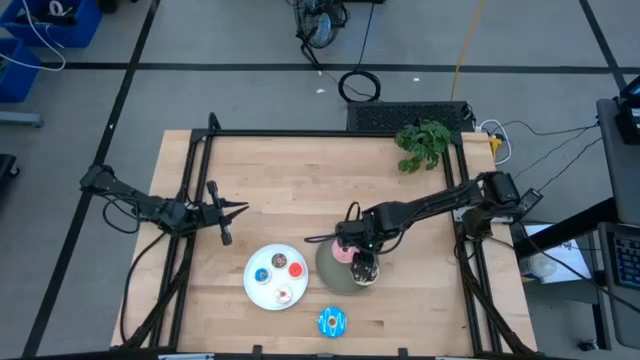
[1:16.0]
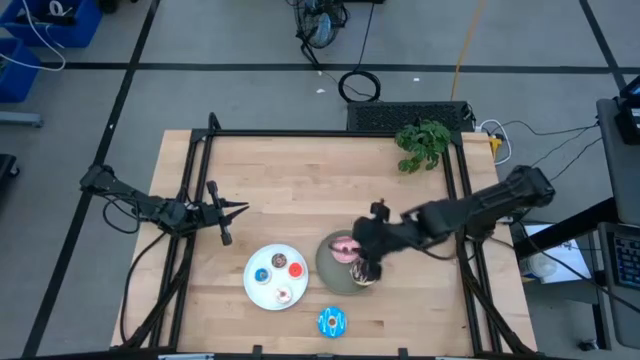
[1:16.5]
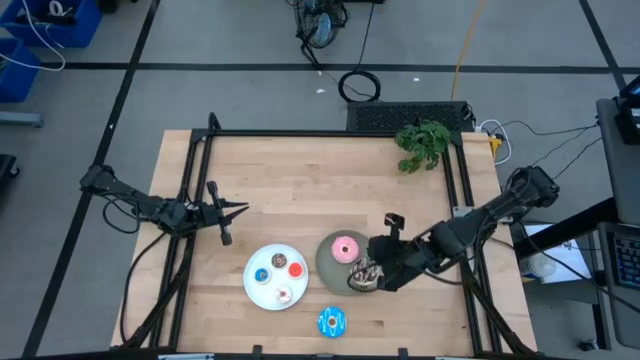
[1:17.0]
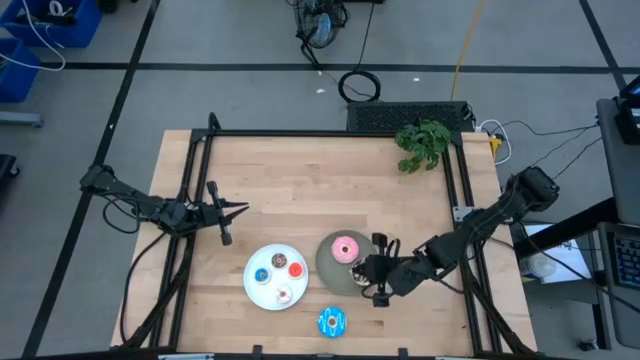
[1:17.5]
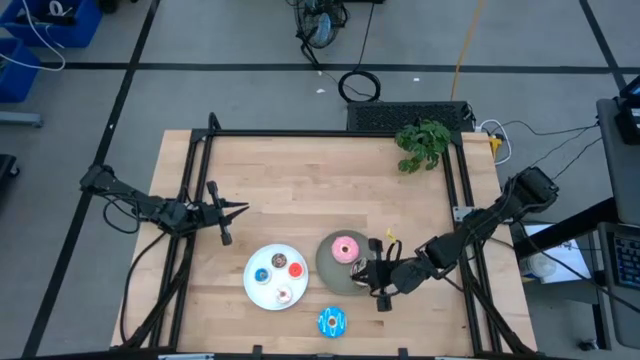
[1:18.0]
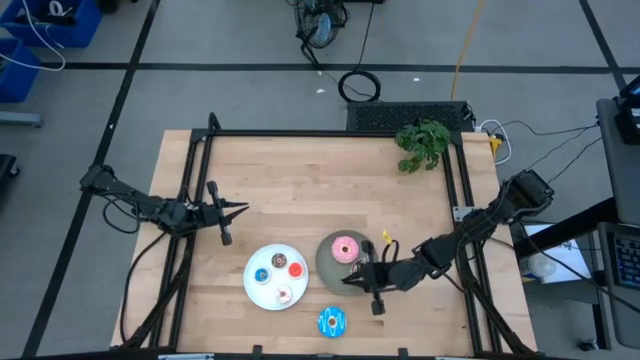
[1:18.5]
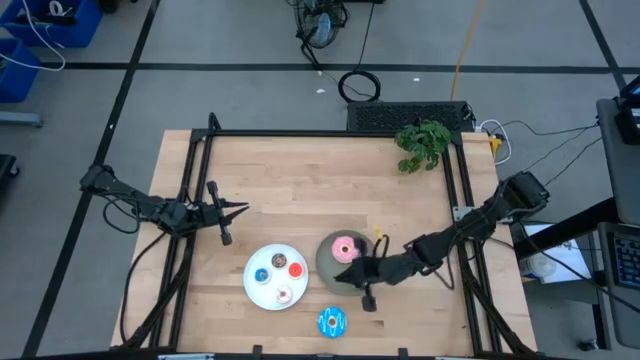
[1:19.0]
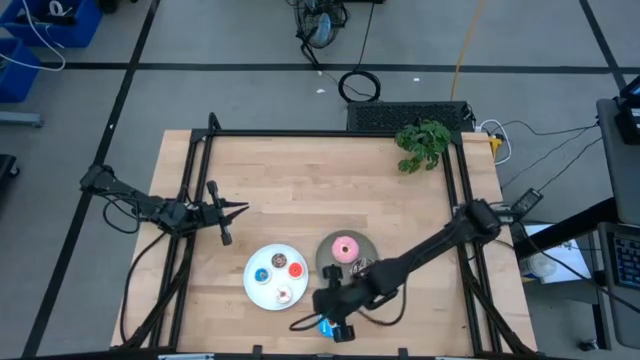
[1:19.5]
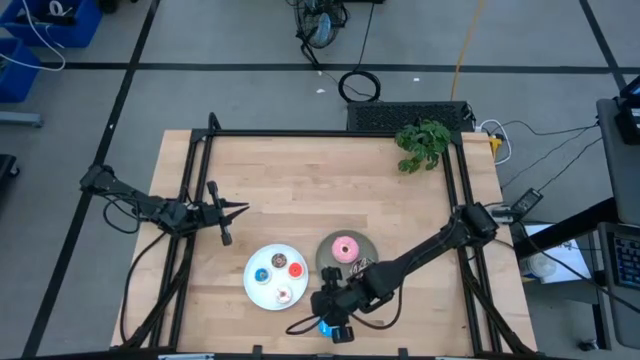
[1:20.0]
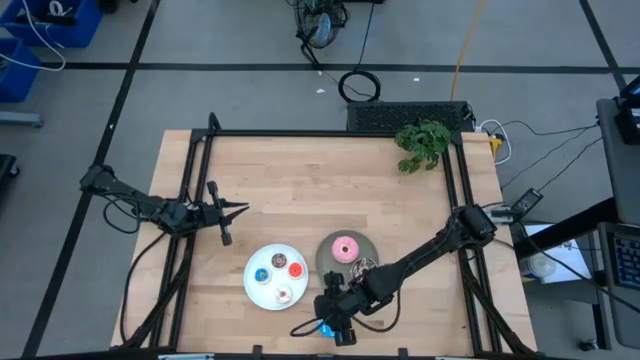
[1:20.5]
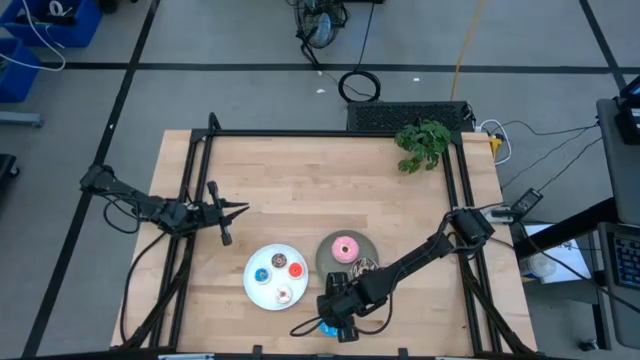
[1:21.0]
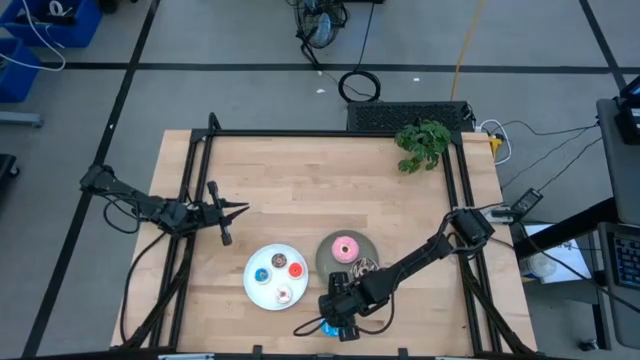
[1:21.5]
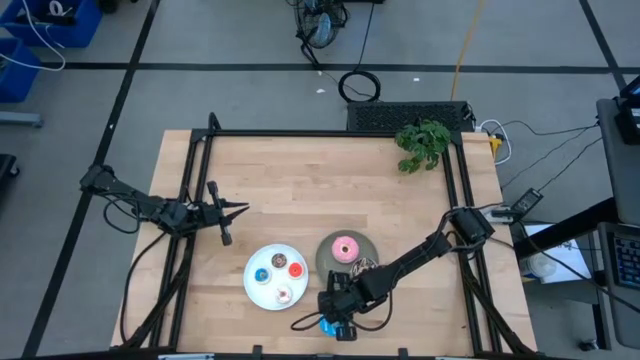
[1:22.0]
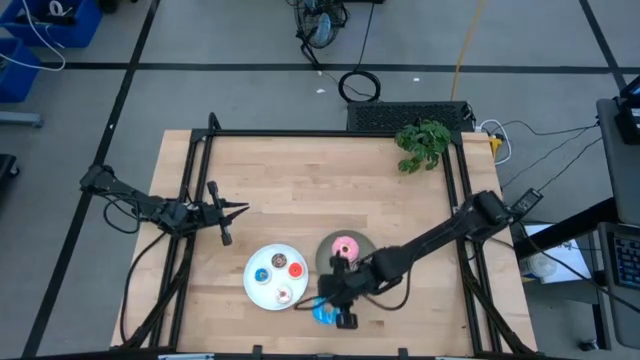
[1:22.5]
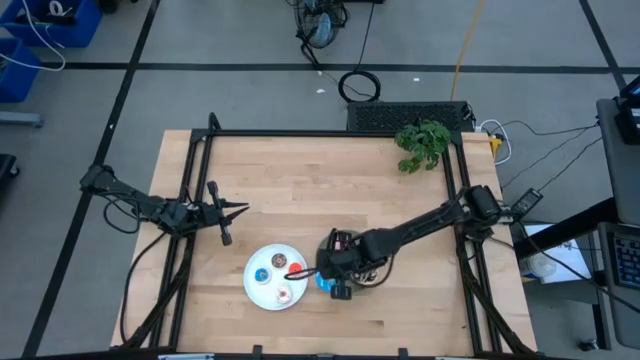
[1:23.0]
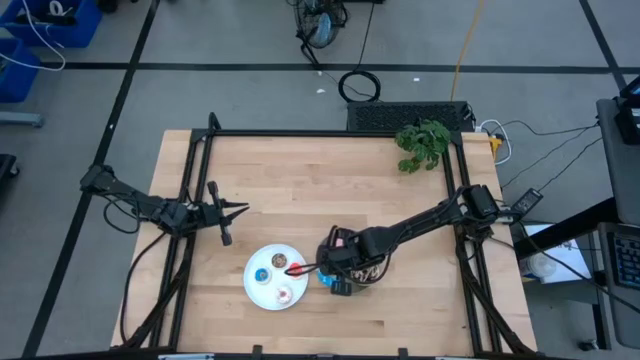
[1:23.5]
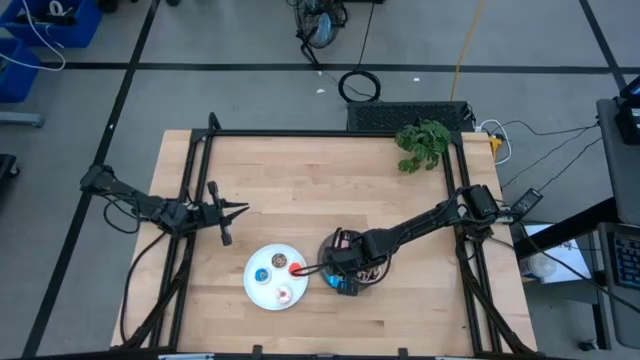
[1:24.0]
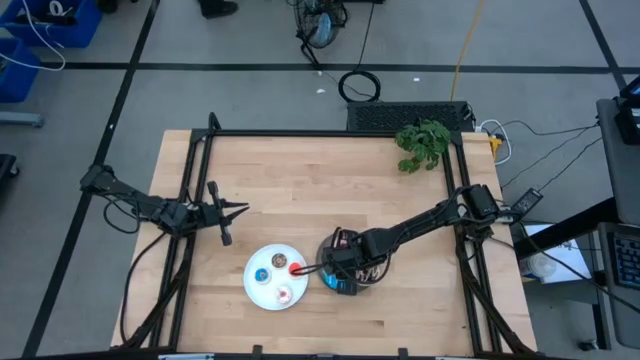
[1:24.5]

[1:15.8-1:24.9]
Task: Pick & Place donuts
Put the large blue donut on the gray plate

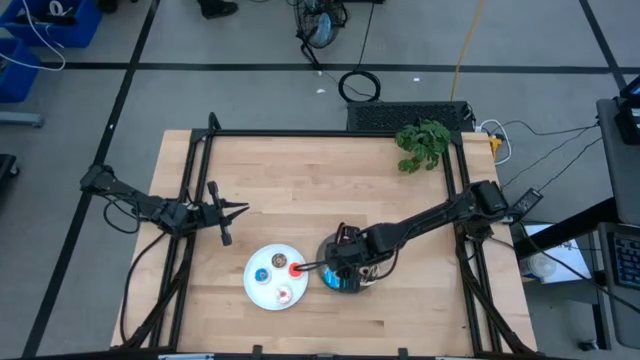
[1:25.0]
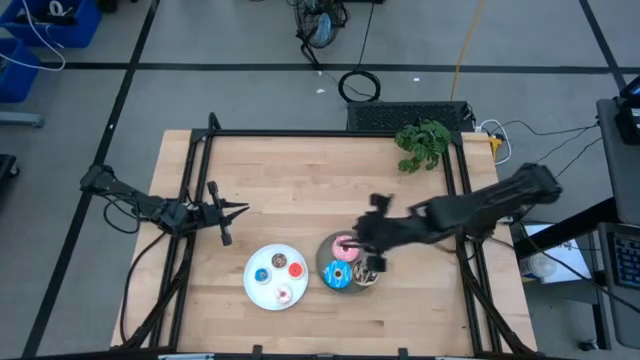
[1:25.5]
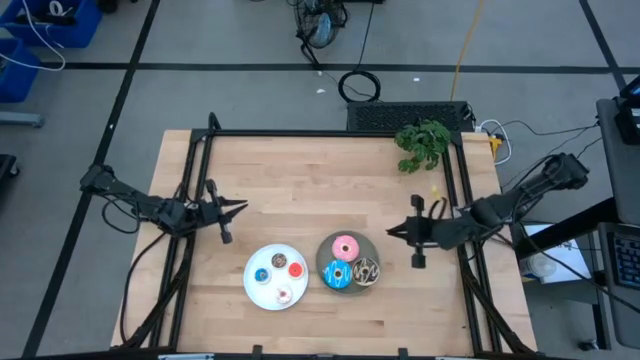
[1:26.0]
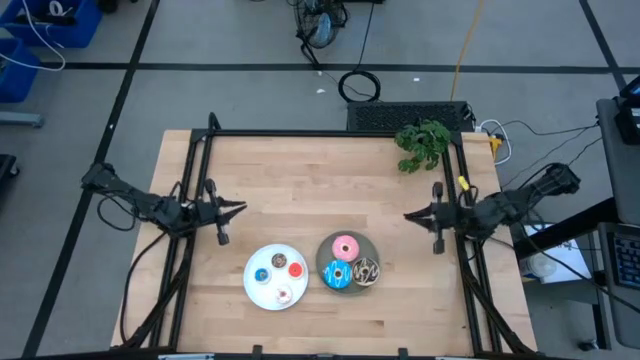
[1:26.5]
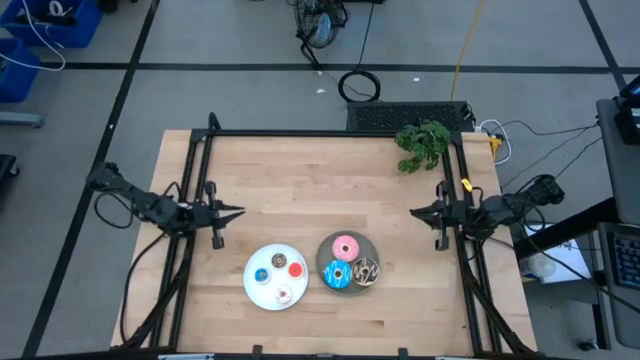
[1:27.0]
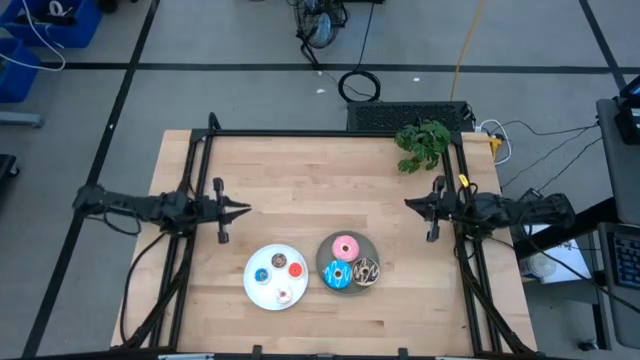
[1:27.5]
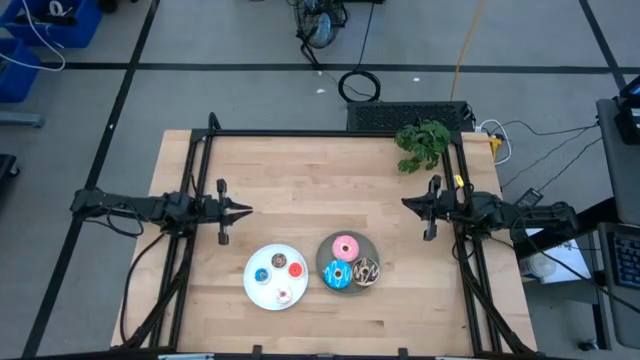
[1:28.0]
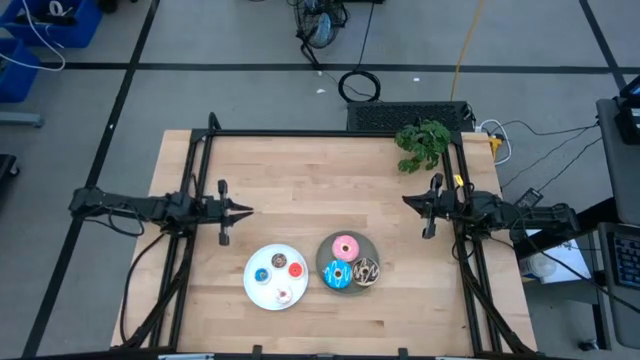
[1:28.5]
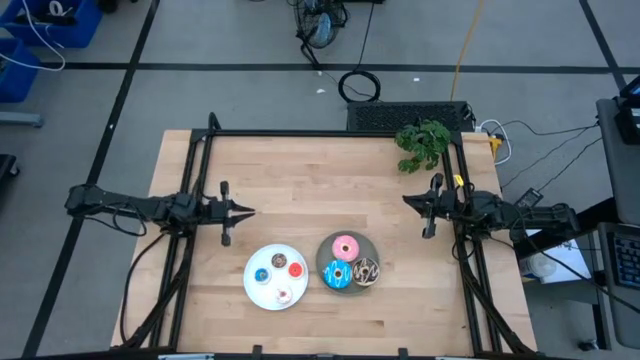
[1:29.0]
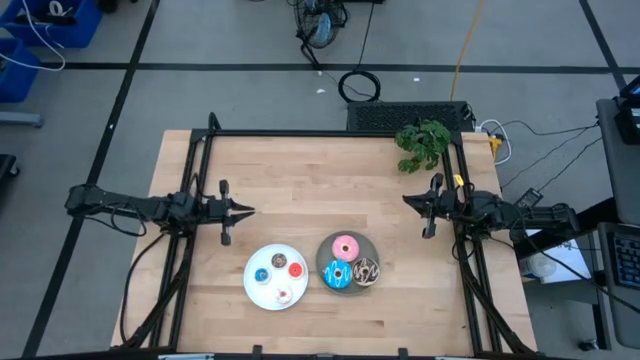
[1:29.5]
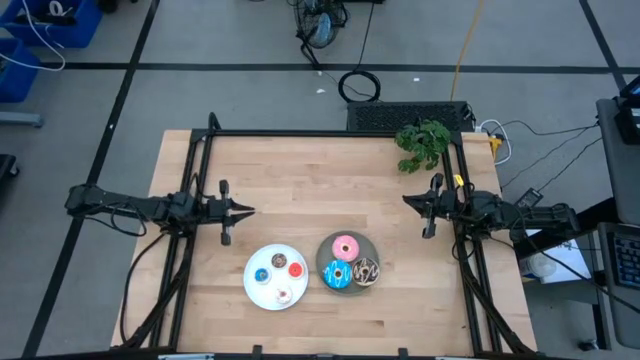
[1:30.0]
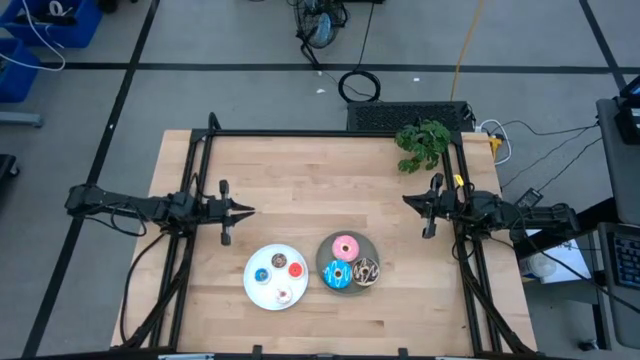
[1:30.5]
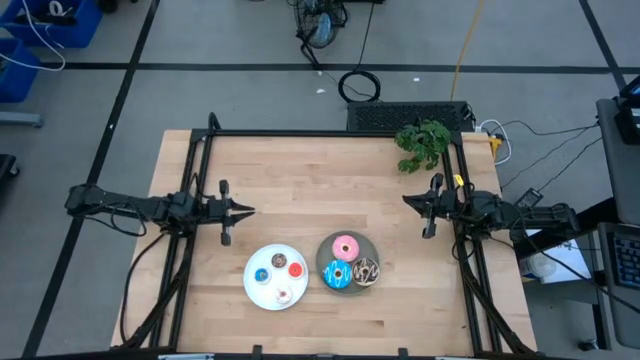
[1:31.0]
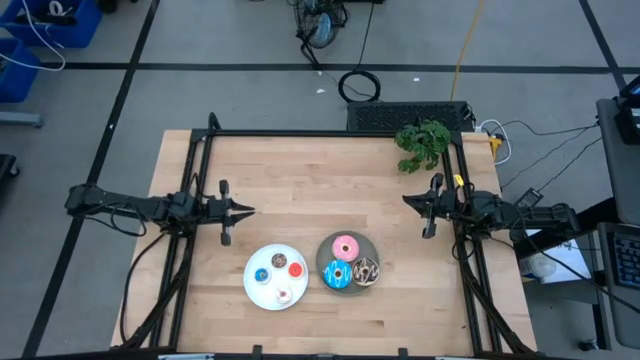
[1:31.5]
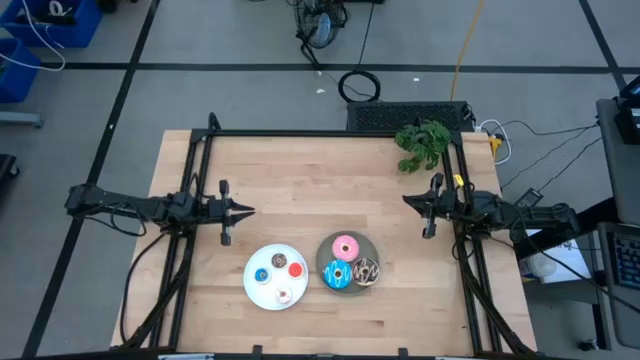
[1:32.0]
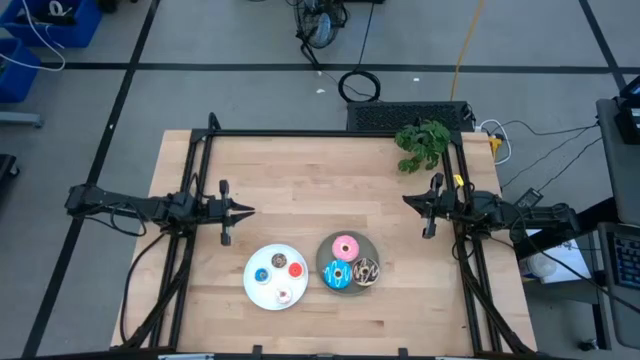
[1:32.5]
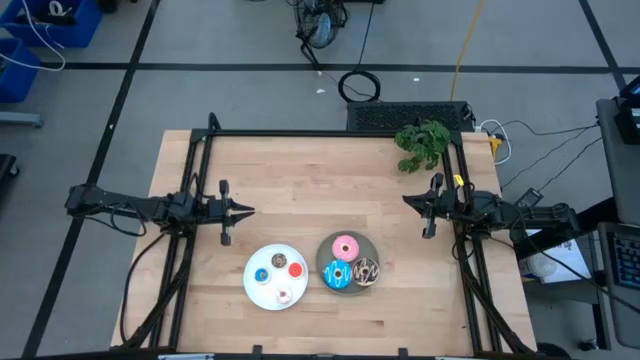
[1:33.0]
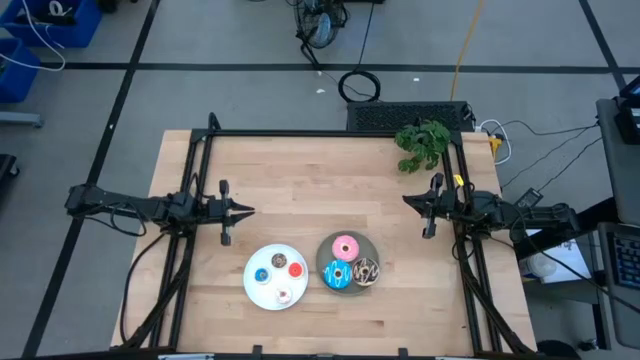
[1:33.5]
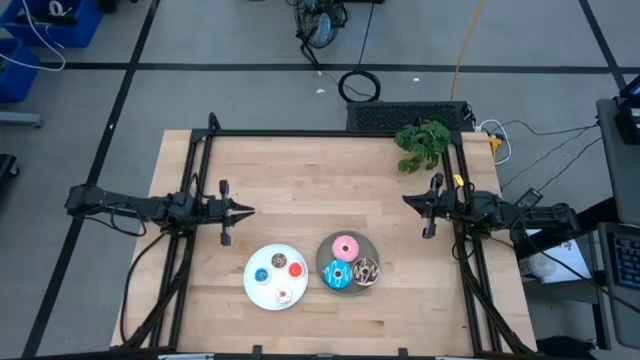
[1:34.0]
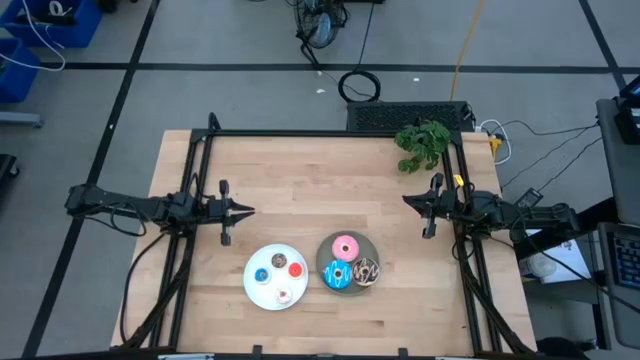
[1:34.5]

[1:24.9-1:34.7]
Return to Home Position

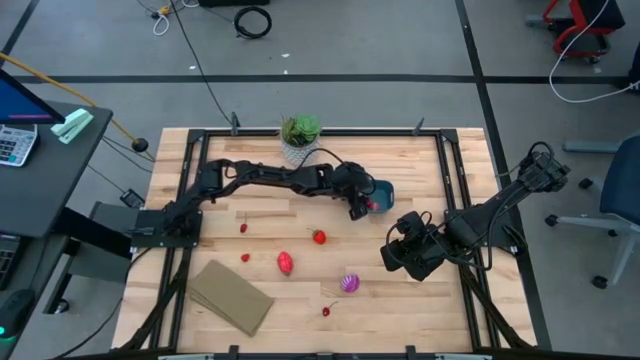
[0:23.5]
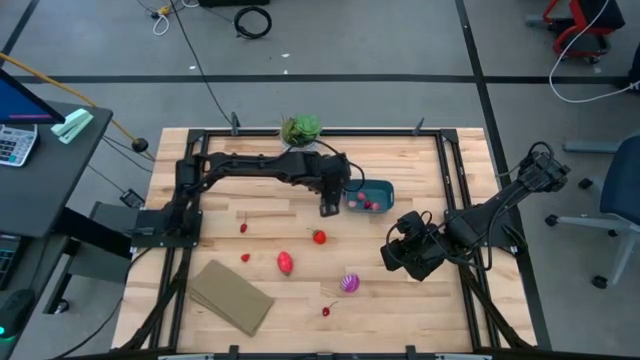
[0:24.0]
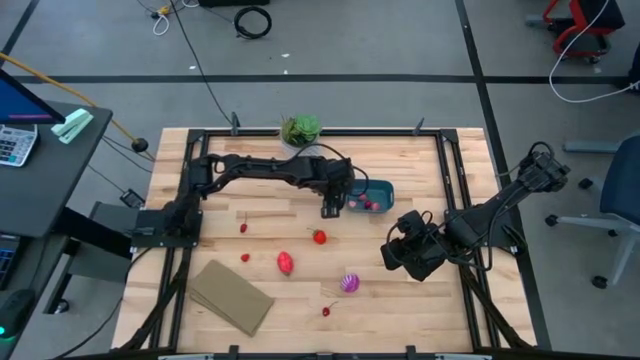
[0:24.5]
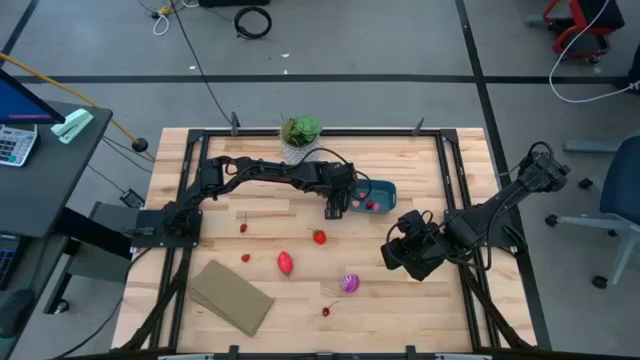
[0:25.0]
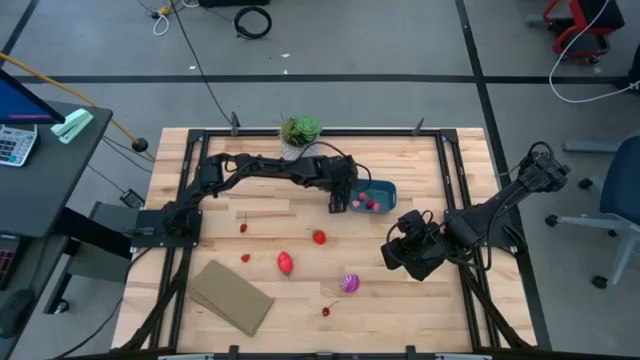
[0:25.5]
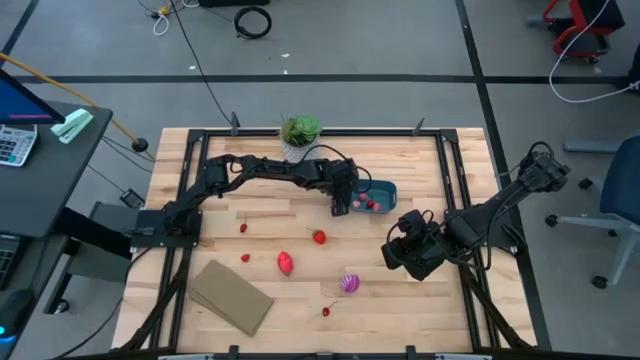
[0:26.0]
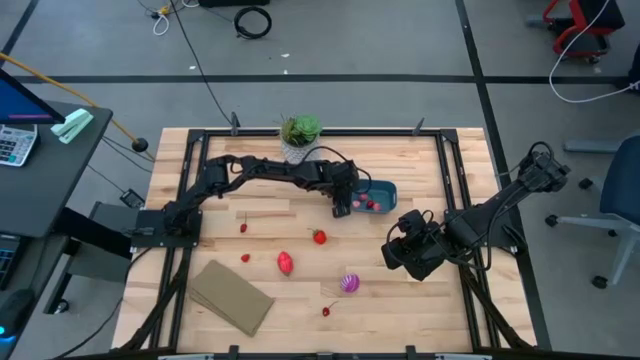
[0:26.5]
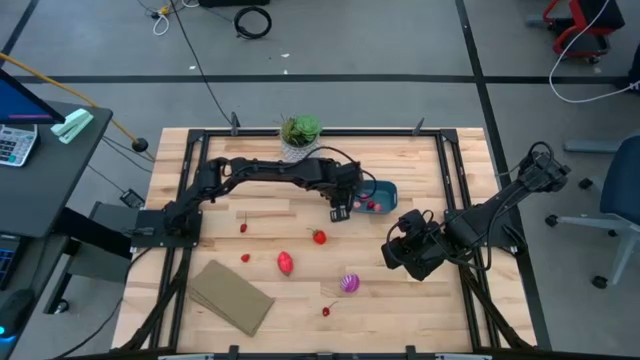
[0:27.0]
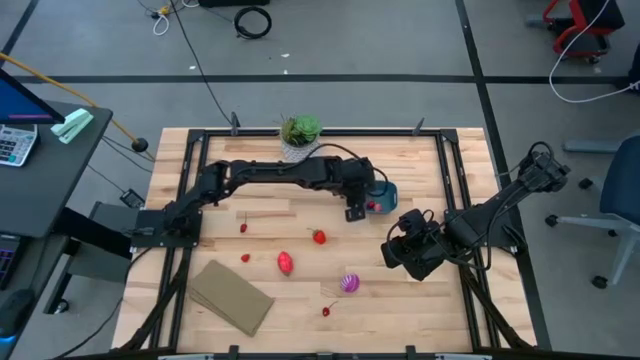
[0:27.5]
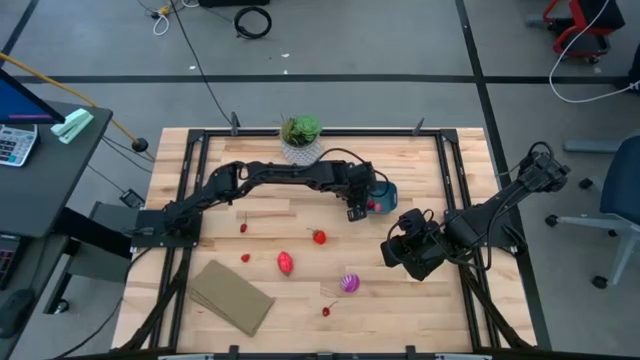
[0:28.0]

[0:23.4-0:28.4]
Task: Pick and placing Produce into tupperware
Put the top red cherry into the blue bin
